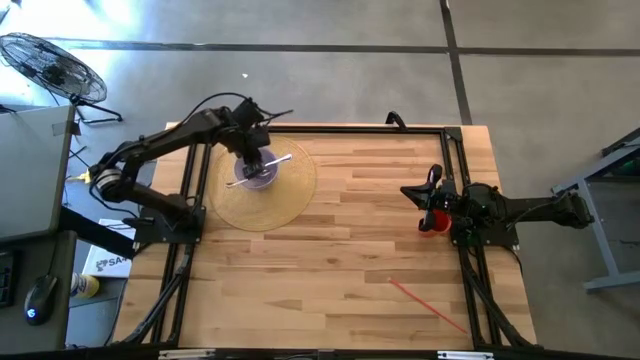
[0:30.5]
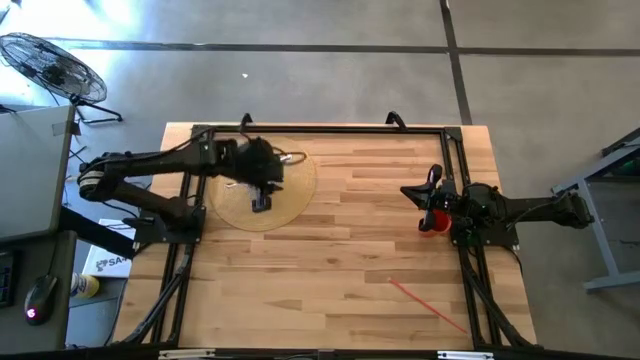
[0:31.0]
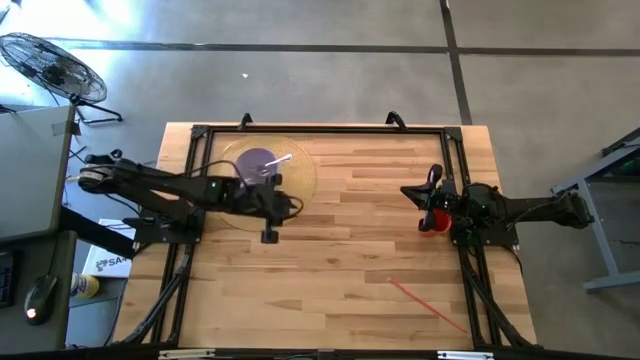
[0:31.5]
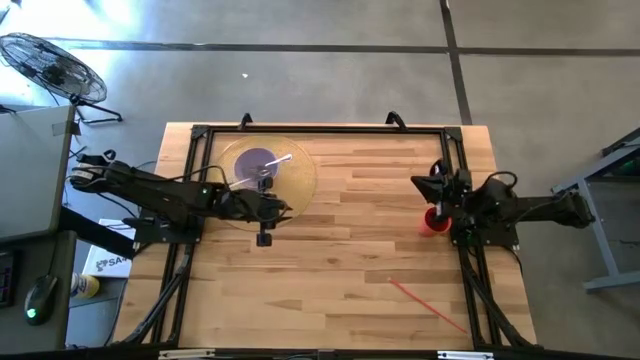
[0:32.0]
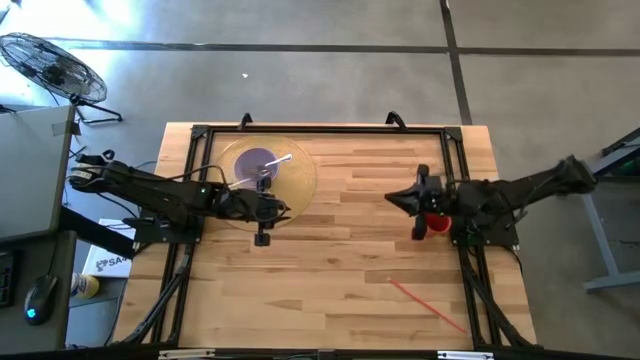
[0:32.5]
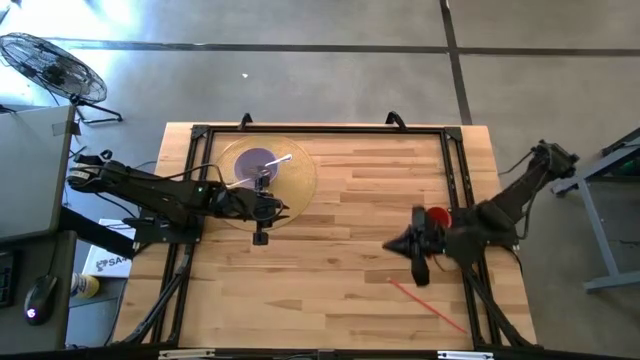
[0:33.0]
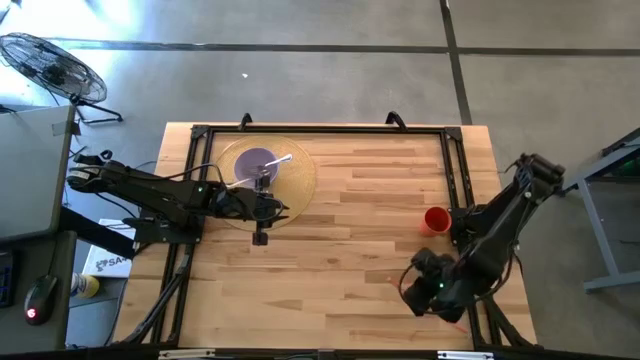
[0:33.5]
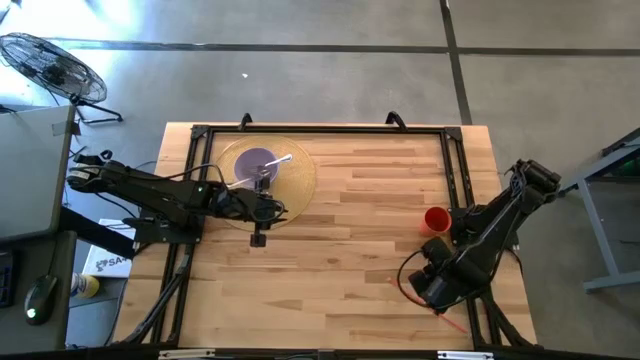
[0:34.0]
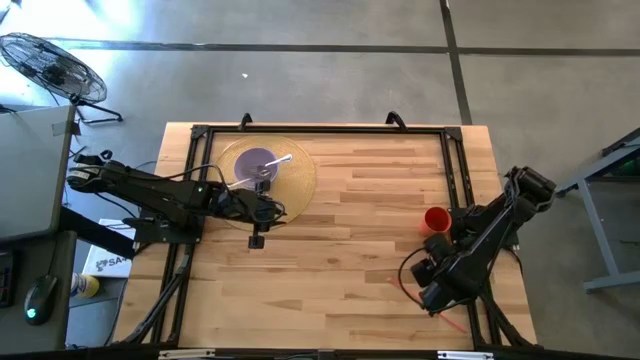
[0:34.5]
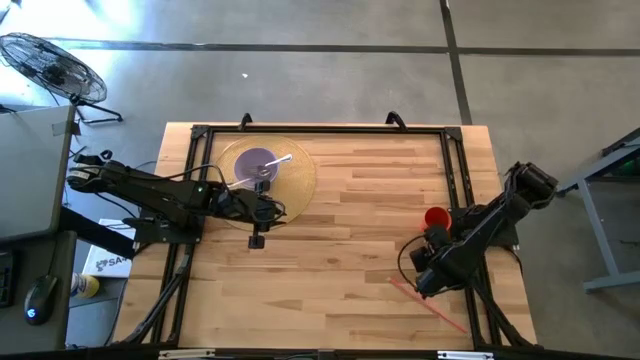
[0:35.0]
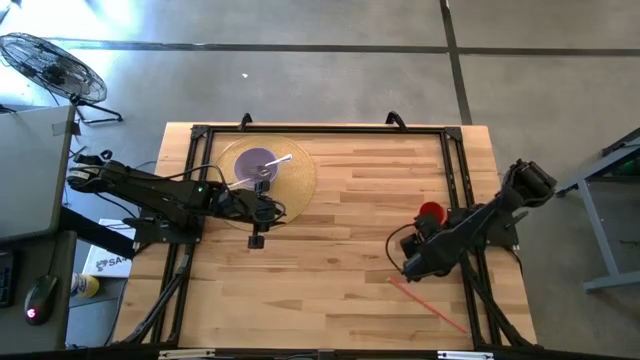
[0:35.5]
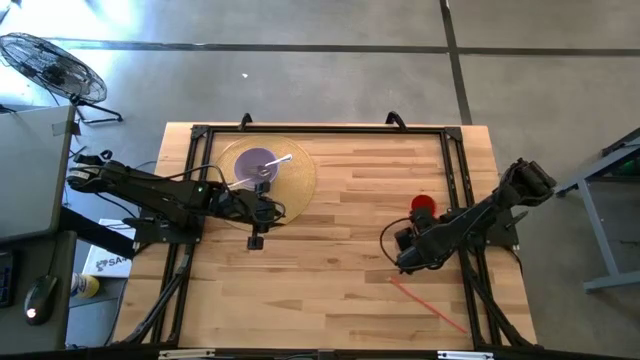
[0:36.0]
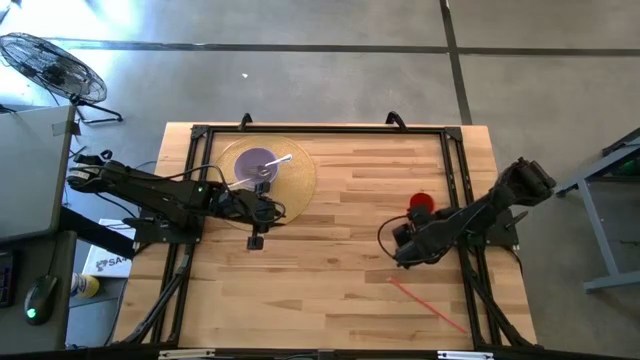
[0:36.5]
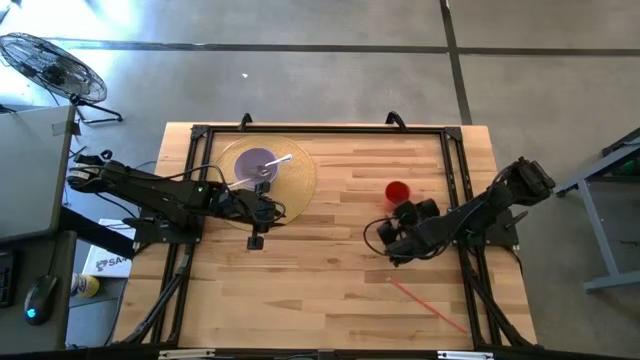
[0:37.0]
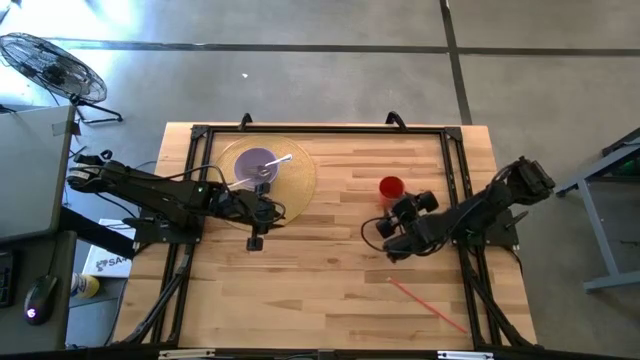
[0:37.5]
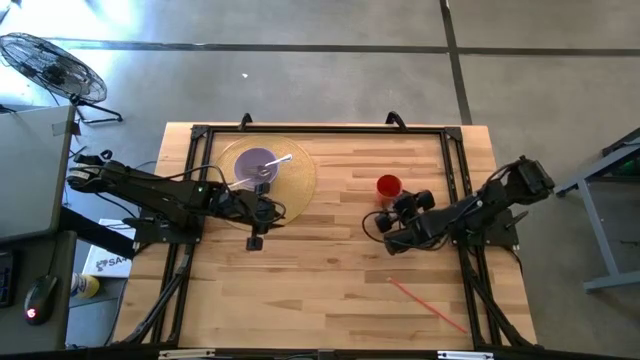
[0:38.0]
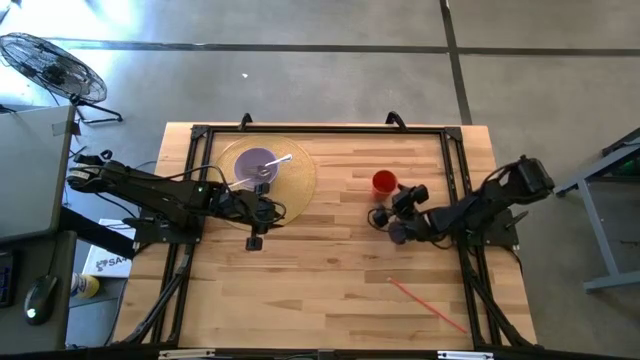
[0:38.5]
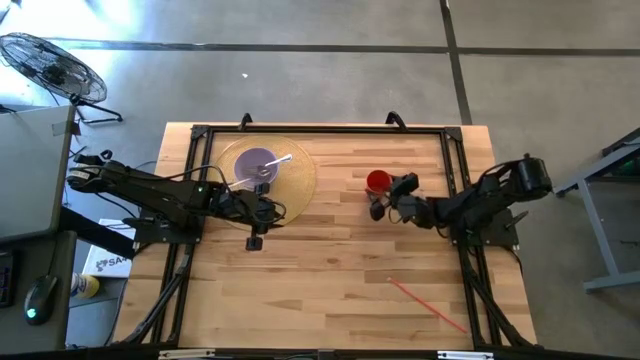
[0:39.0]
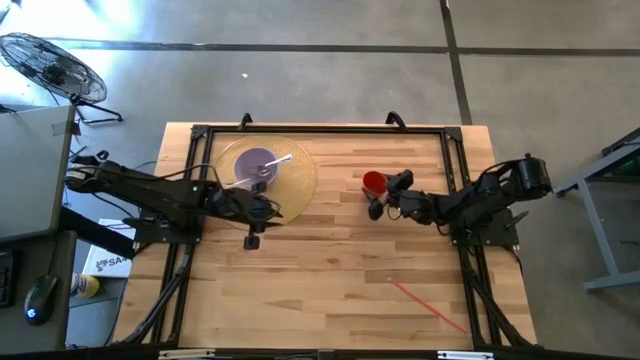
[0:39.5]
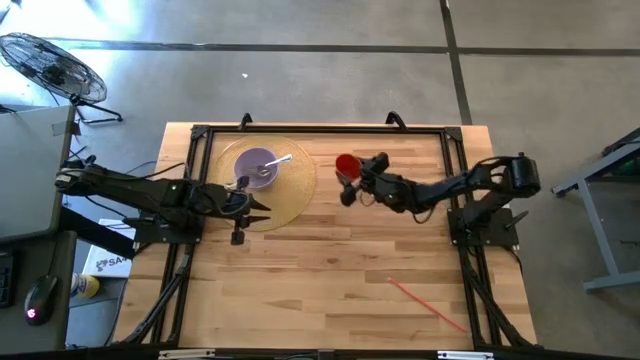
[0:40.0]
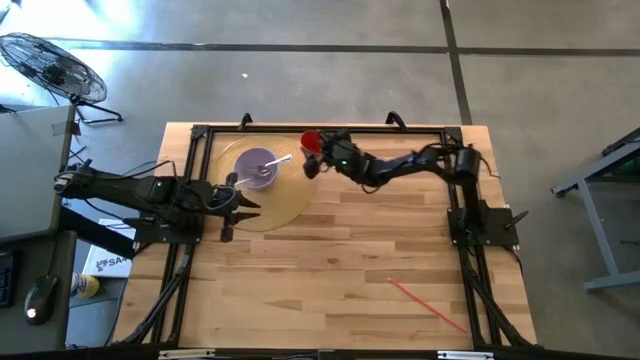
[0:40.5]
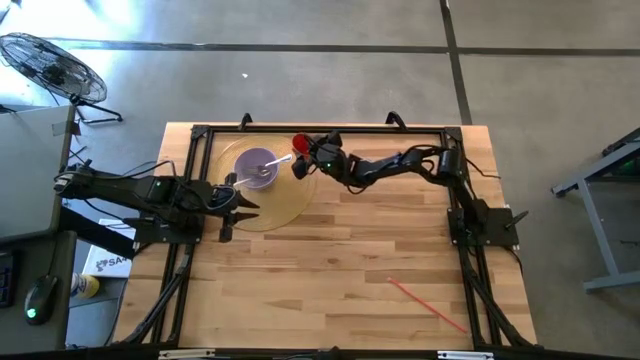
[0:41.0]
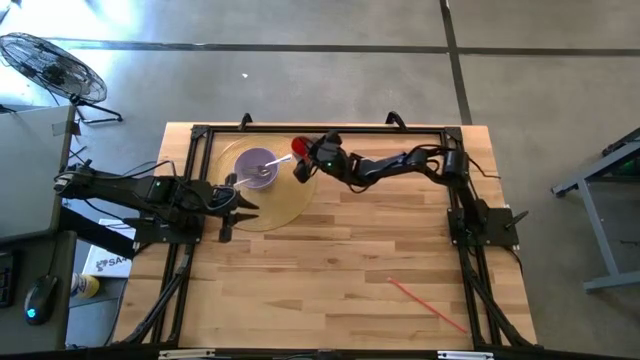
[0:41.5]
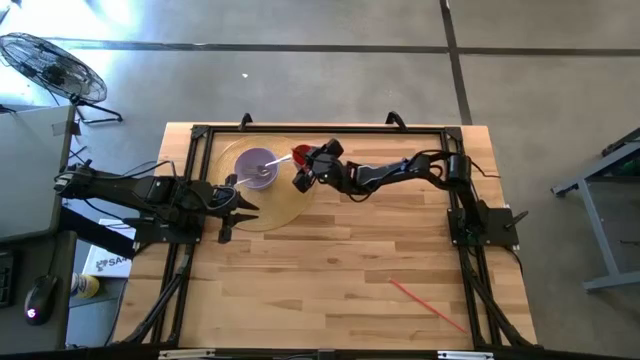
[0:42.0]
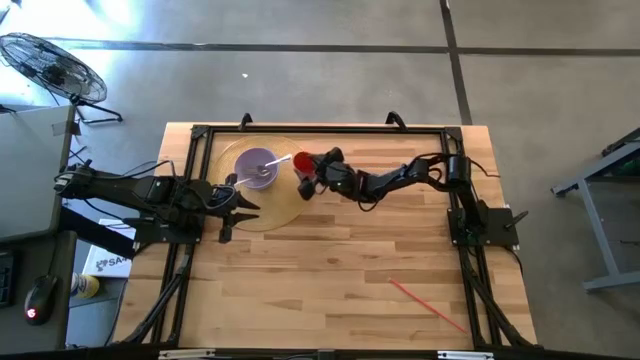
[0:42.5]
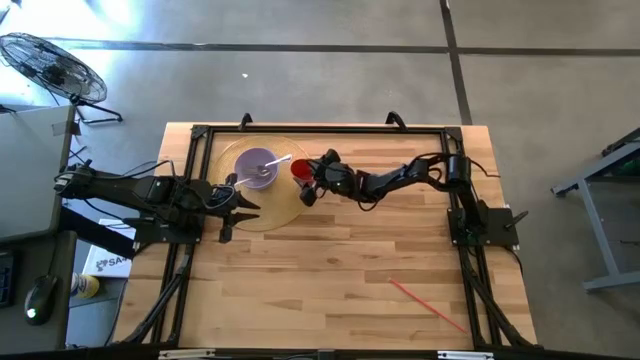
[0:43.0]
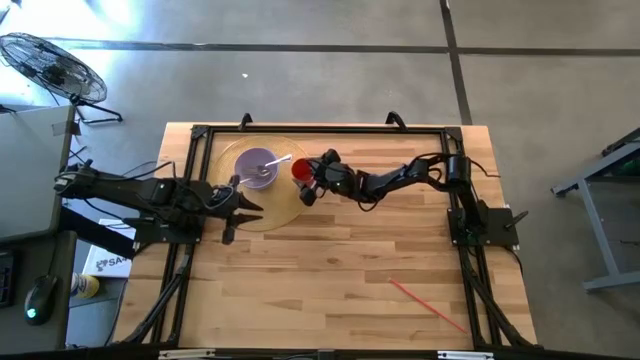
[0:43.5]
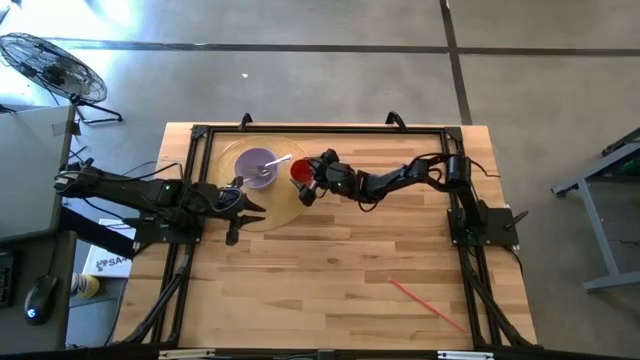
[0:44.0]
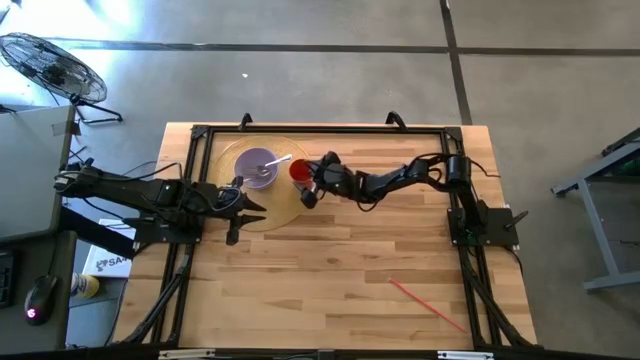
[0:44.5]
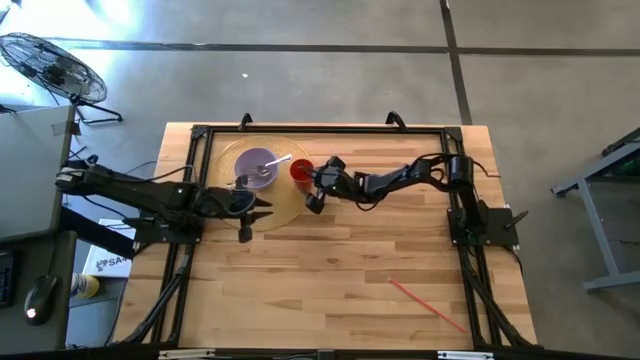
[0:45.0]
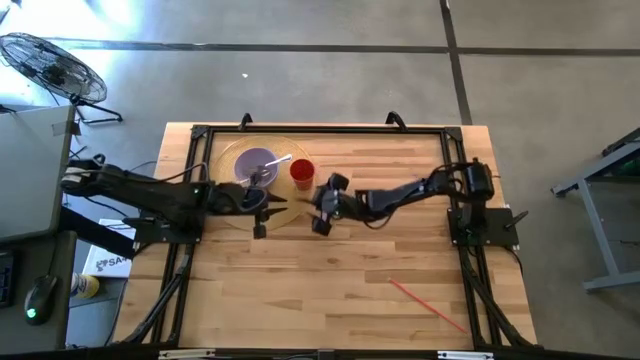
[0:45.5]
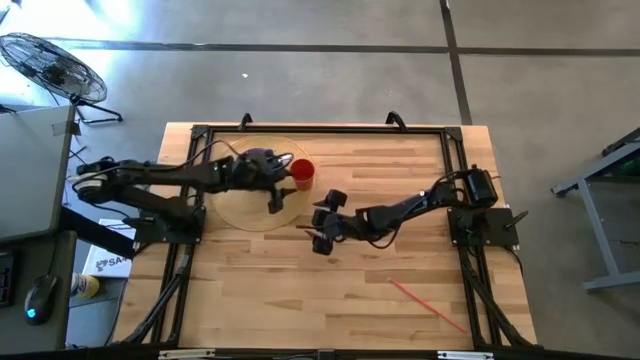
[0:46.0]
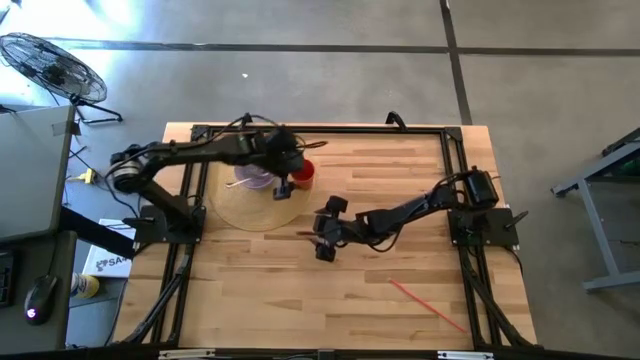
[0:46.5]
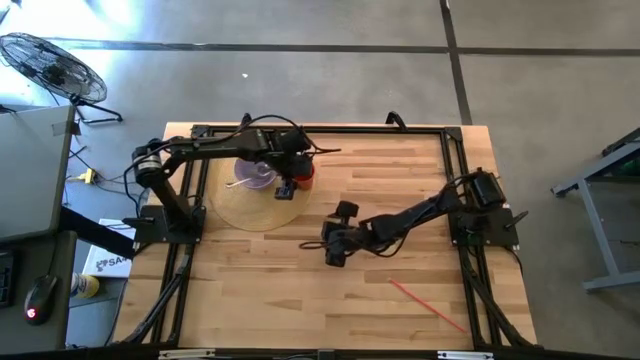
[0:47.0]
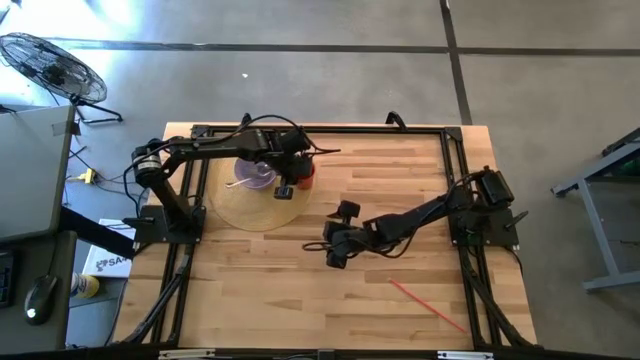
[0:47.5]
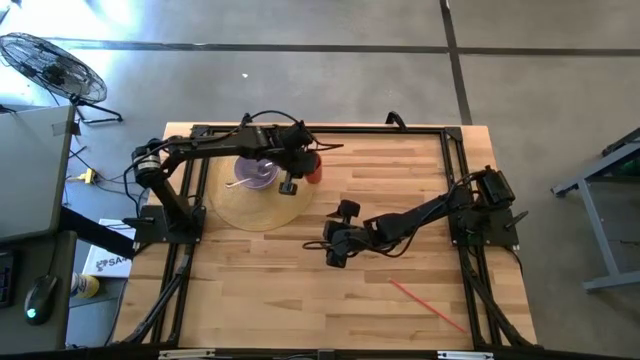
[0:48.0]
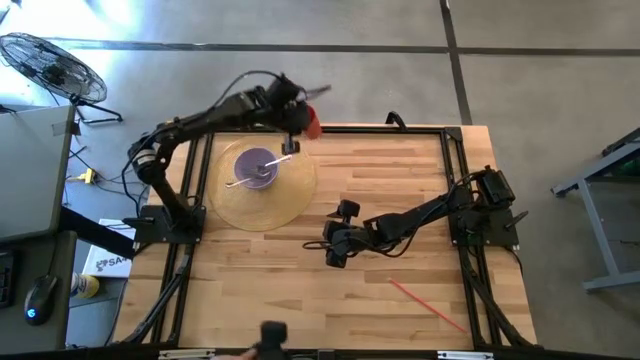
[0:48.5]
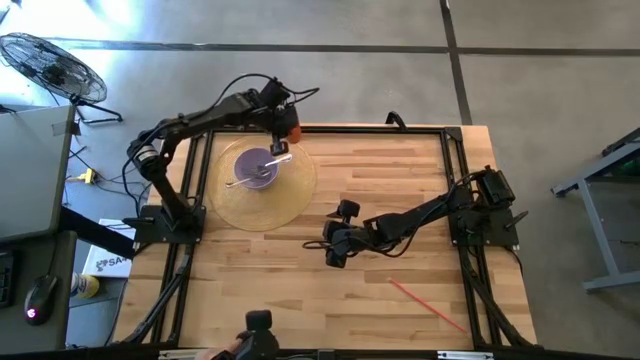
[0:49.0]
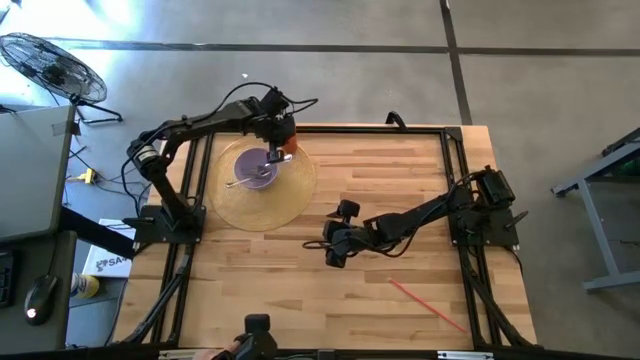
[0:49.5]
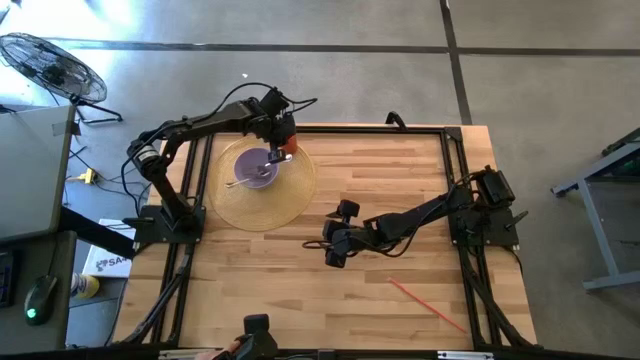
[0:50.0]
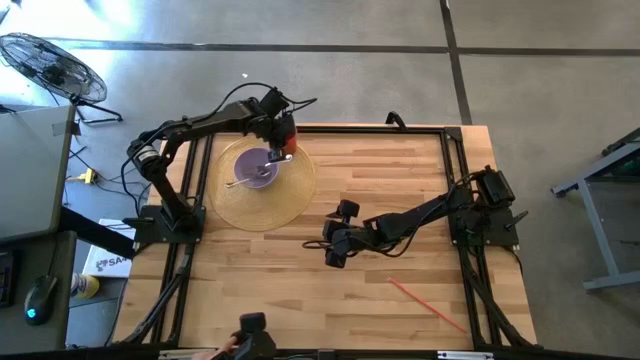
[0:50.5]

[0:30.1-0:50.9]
Task: Pick & Place Utensil
Put the orange cup on the brown table mat to the top right of the purple bowl
